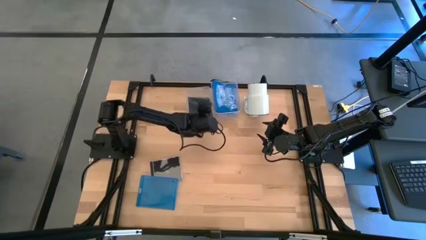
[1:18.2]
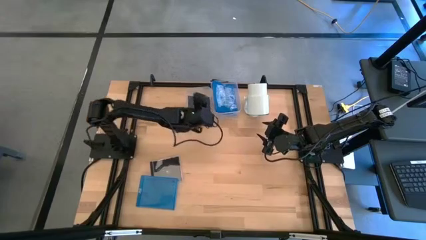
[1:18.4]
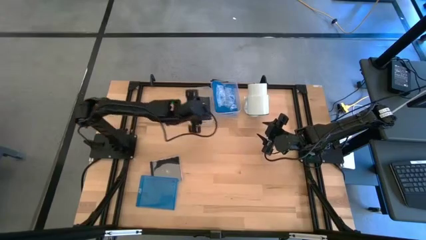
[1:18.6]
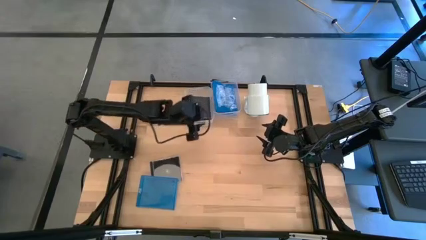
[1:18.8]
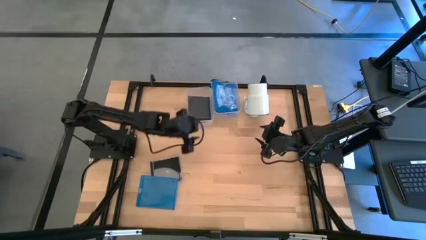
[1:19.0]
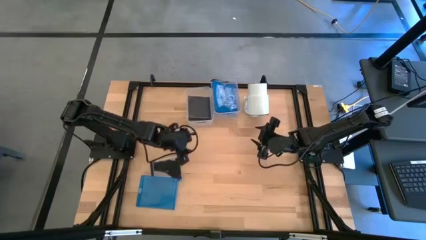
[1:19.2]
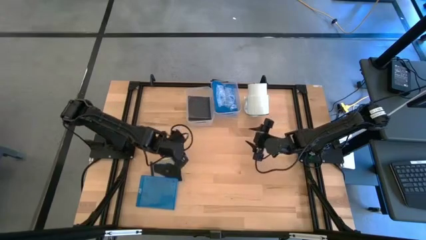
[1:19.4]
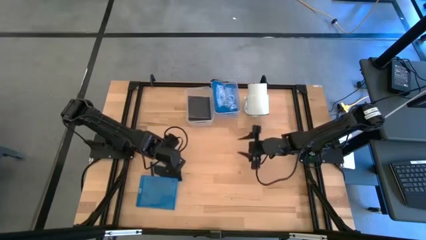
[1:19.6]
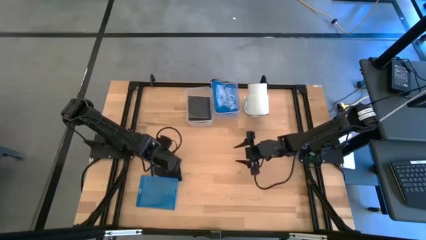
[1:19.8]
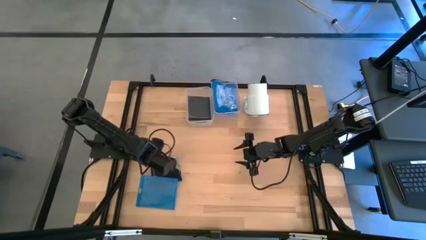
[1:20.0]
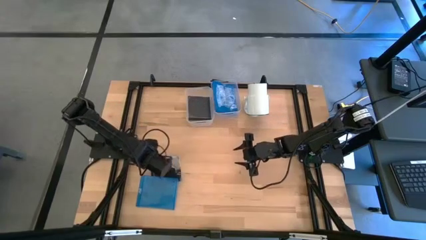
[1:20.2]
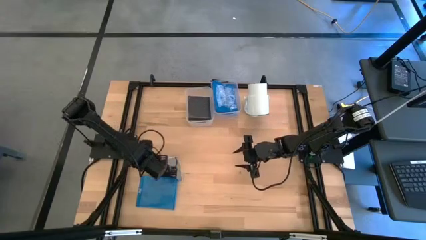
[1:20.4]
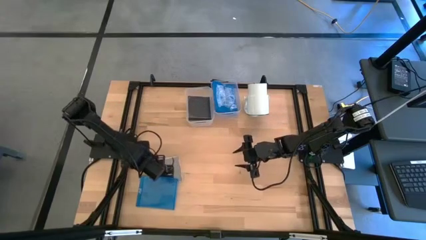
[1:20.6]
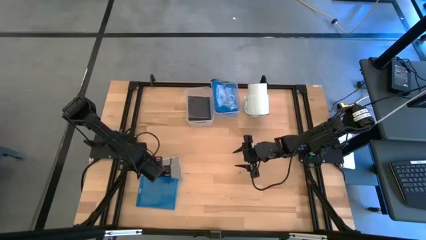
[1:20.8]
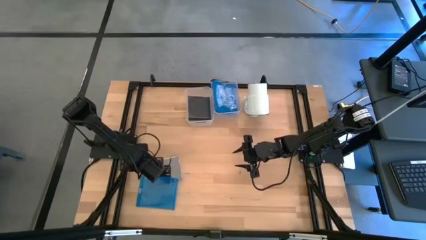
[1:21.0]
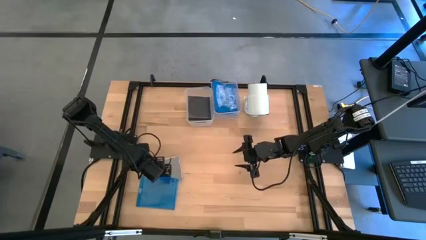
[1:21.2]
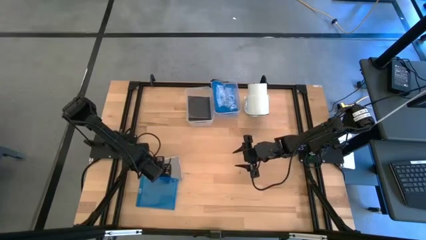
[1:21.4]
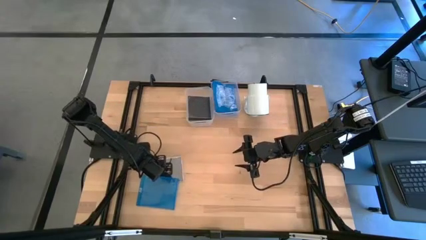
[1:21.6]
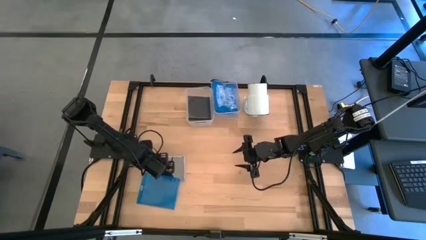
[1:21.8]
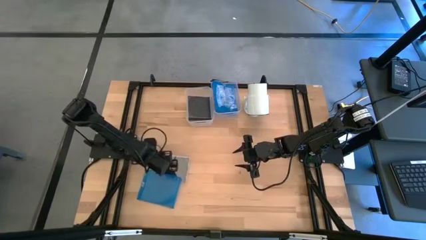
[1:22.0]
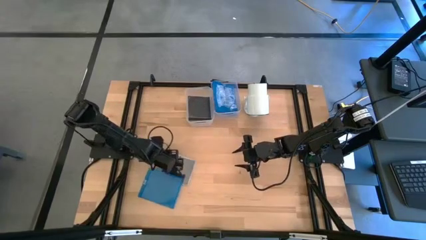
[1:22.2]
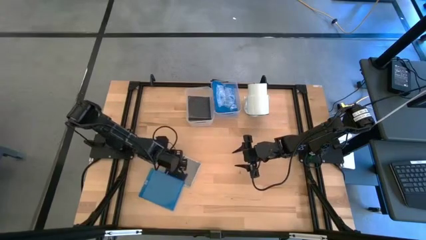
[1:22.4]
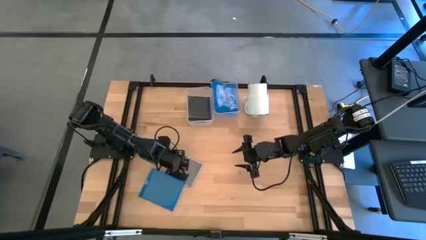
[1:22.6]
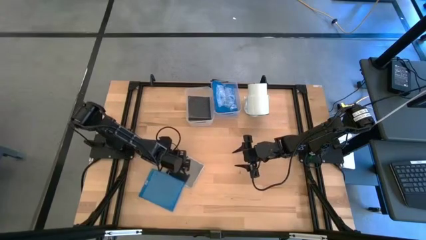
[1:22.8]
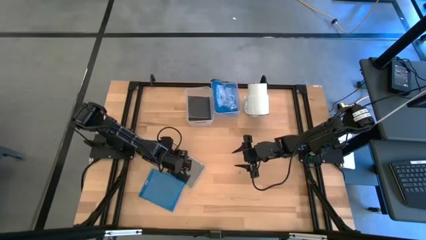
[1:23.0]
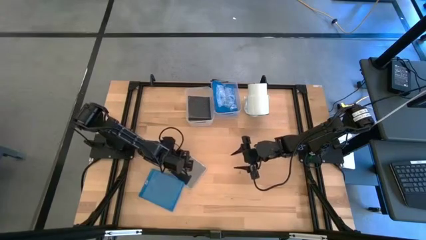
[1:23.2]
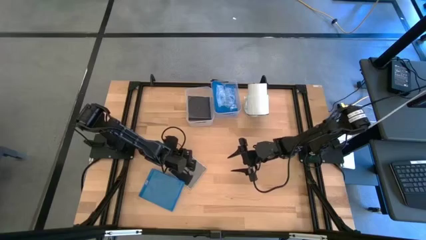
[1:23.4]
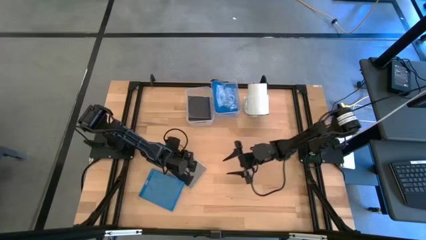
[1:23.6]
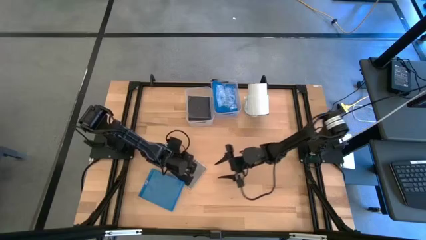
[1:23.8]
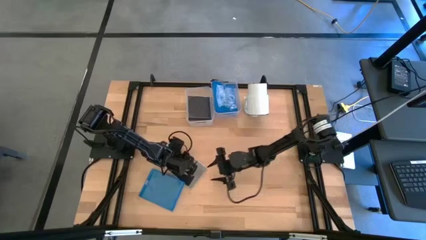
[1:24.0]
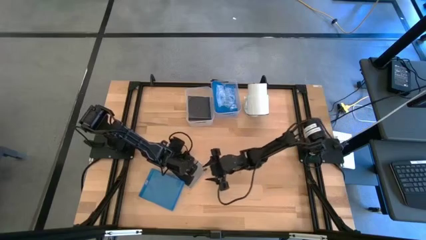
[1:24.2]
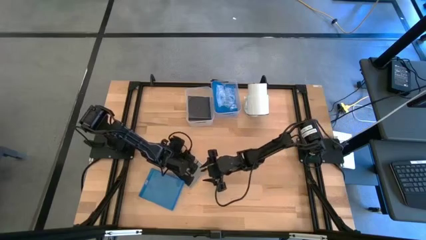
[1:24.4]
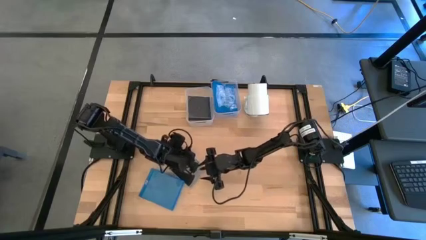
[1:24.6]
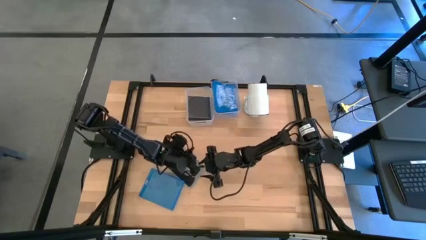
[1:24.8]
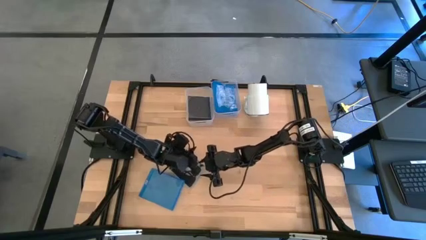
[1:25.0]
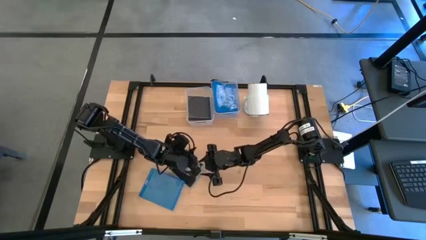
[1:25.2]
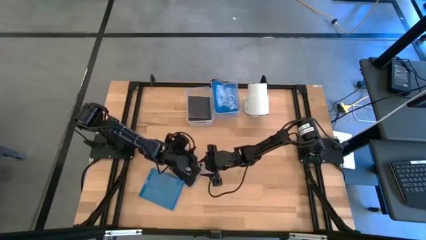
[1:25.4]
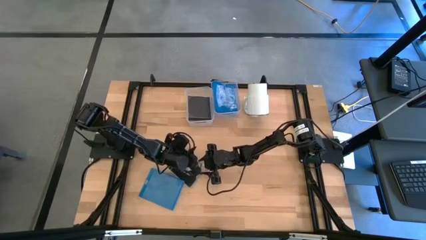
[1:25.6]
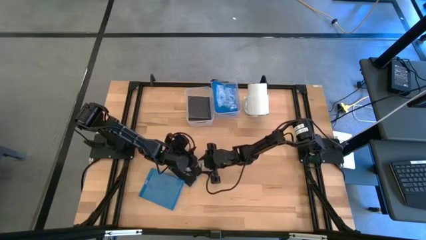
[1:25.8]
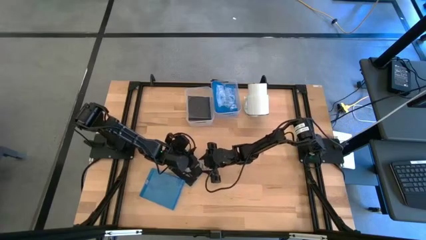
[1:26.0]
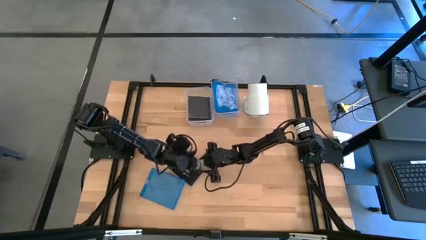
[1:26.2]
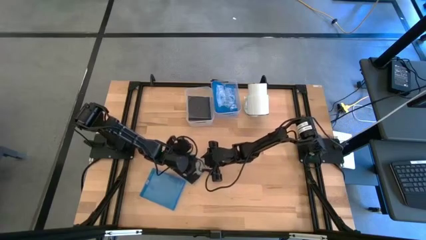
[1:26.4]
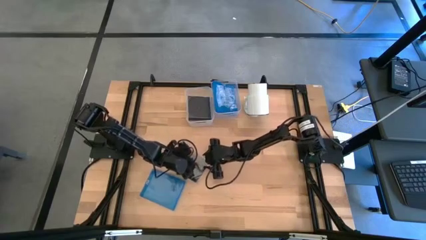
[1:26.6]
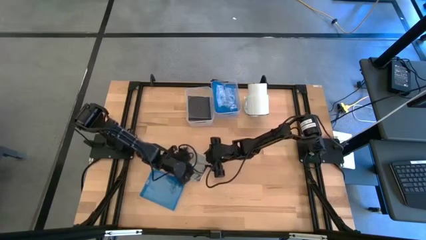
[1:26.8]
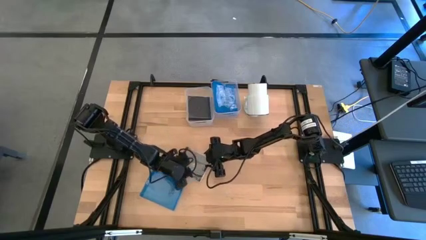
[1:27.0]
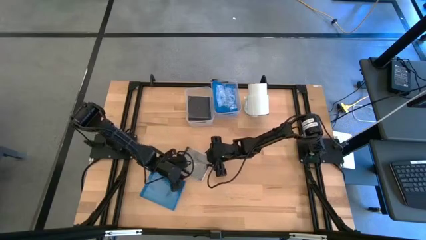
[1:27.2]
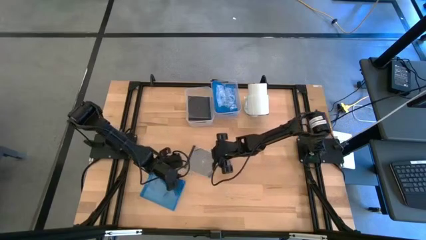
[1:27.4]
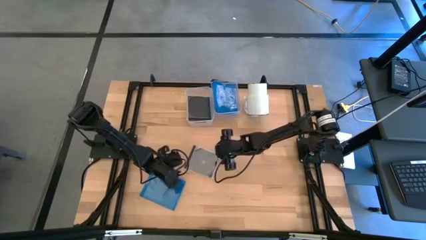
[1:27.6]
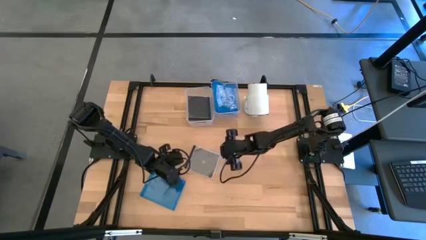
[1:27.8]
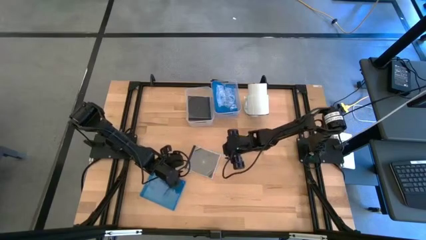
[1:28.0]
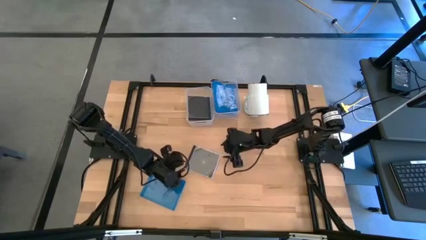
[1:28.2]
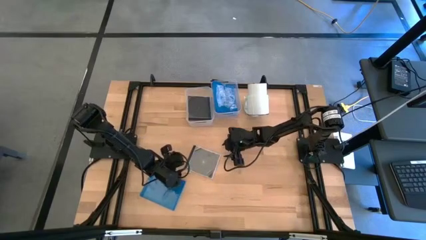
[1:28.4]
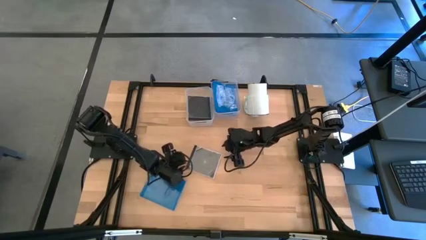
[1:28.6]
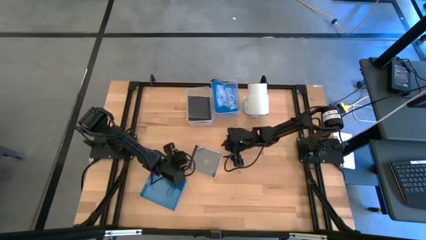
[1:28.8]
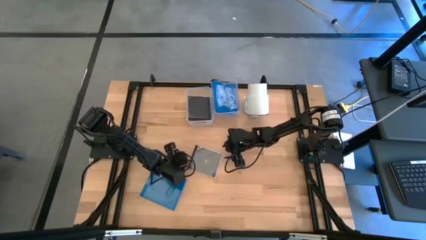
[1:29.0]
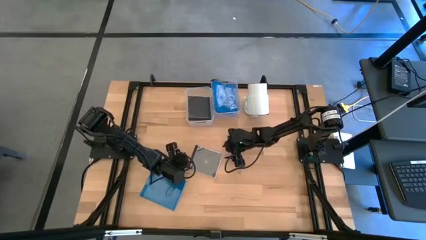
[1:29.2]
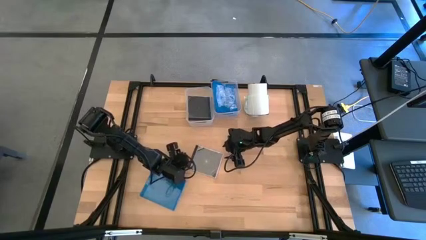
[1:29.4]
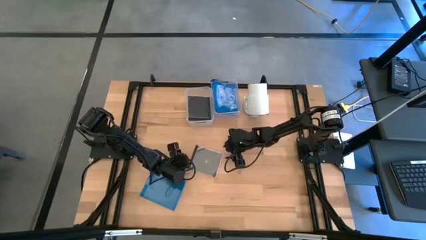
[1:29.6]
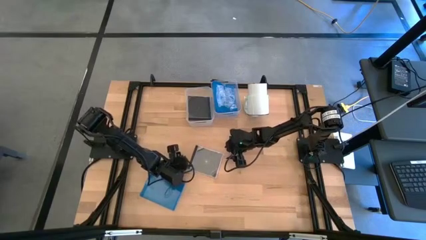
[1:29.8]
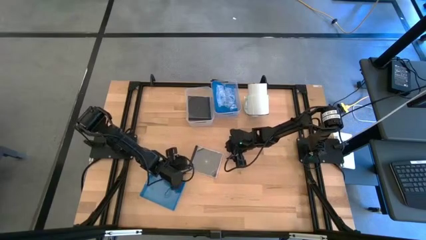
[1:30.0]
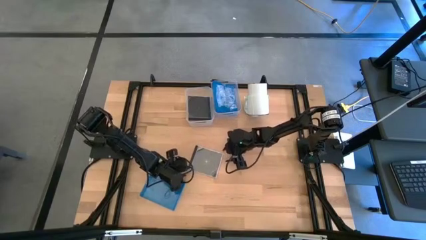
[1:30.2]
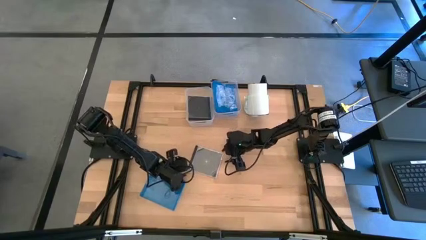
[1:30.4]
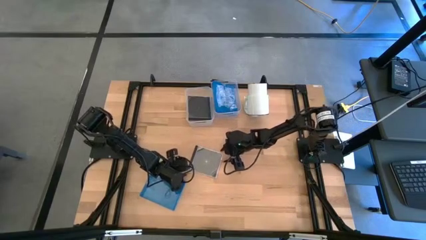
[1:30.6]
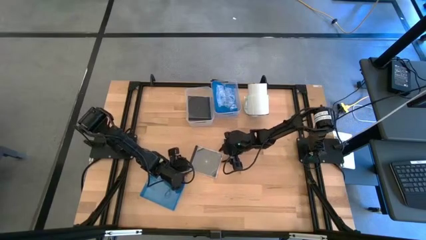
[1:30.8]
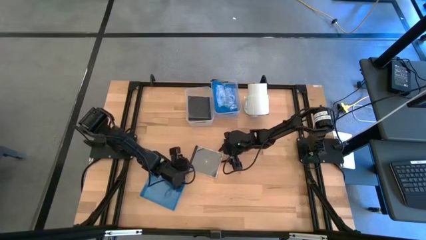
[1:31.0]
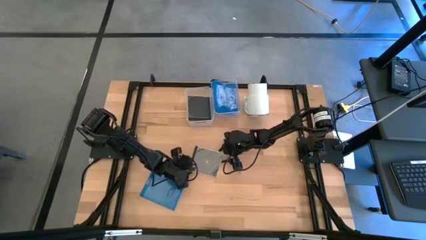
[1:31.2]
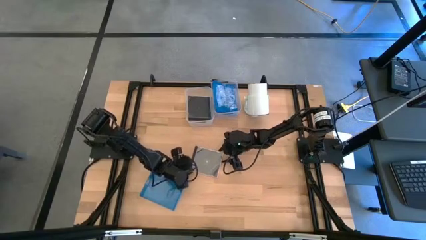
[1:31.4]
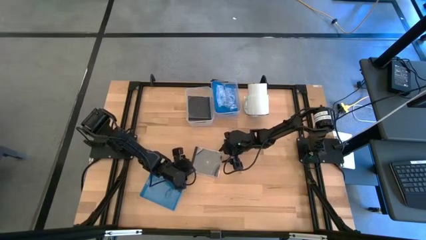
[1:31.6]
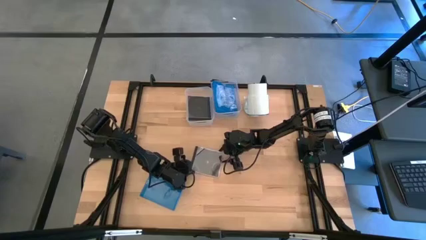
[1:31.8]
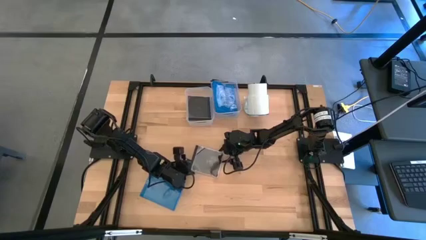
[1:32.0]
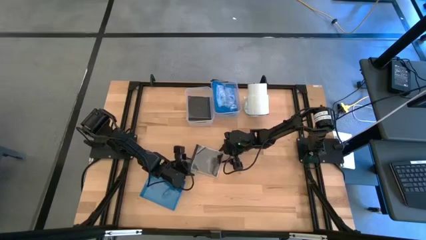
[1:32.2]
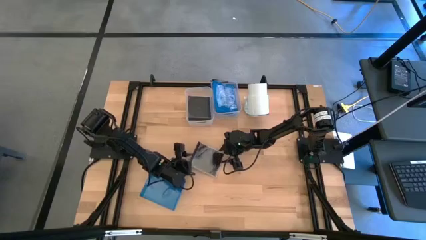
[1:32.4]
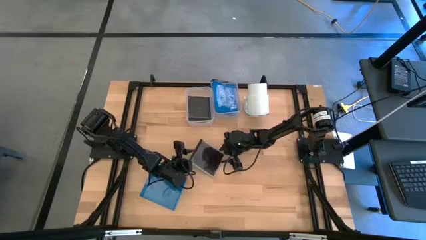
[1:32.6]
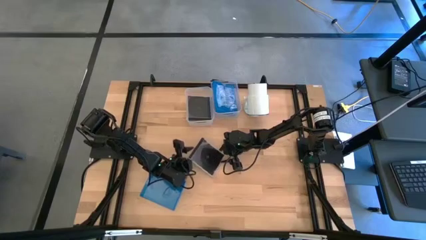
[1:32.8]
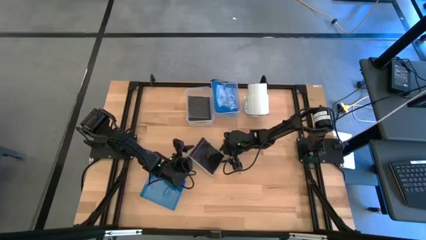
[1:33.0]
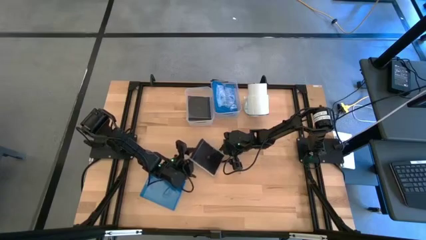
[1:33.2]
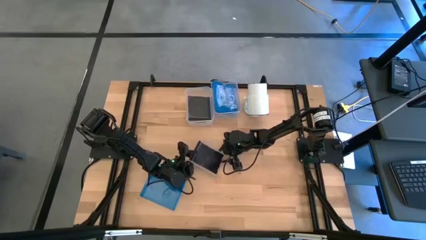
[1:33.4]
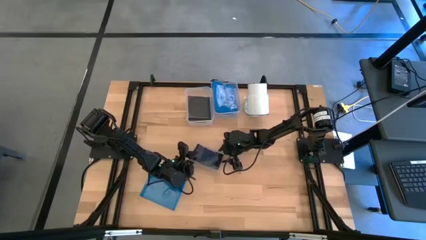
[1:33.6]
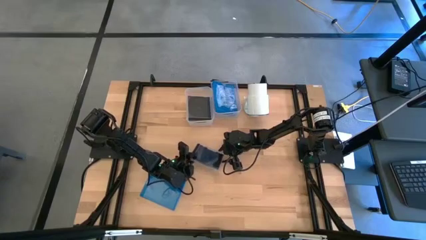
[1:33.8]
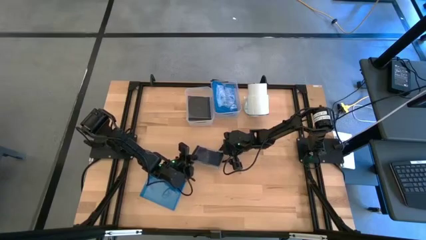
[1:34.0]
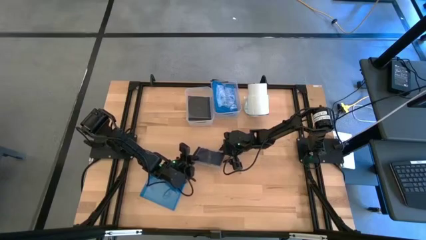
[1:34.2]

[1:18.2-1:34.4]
Task: Pick & place jewel cases by type
Put the black CD Case into the left transparent bin
